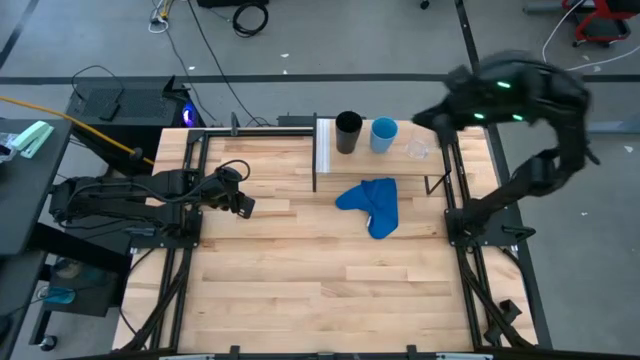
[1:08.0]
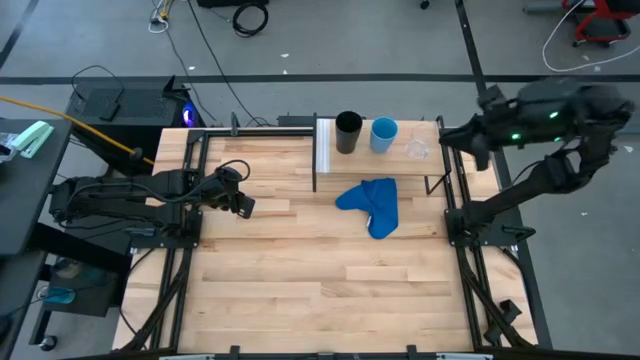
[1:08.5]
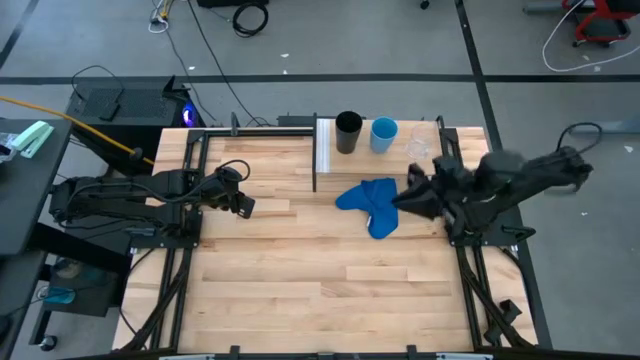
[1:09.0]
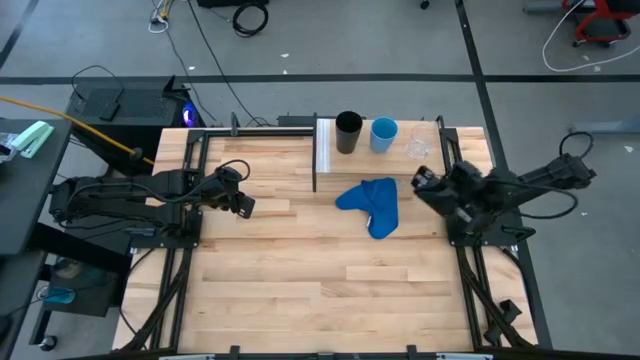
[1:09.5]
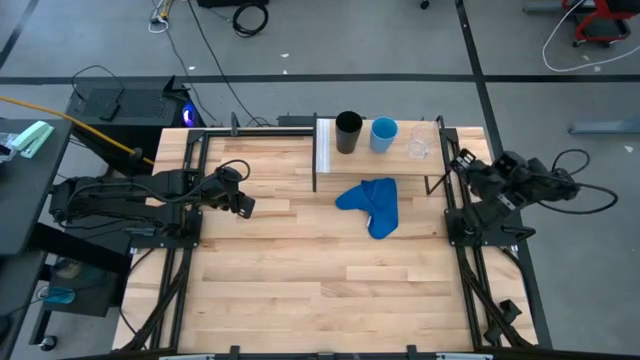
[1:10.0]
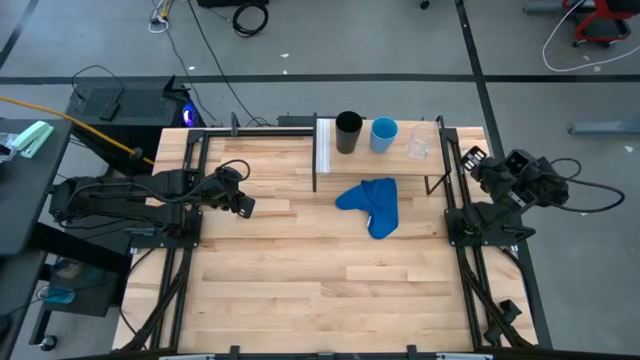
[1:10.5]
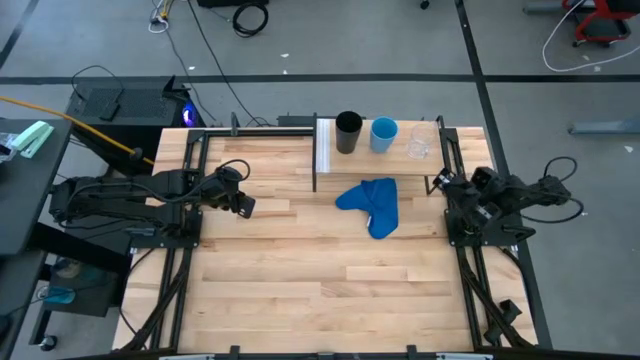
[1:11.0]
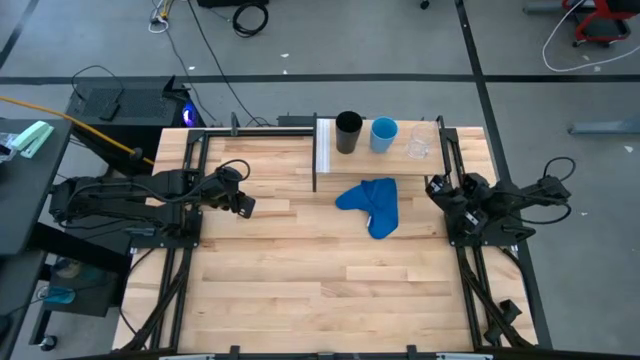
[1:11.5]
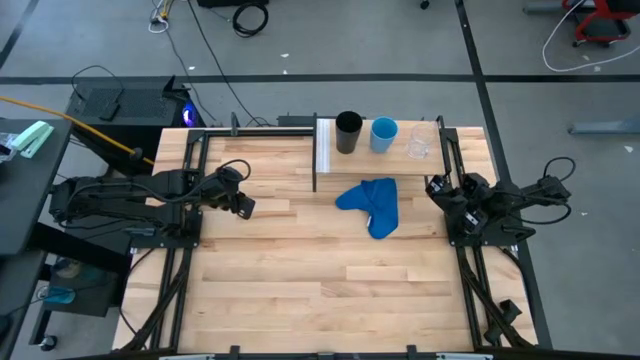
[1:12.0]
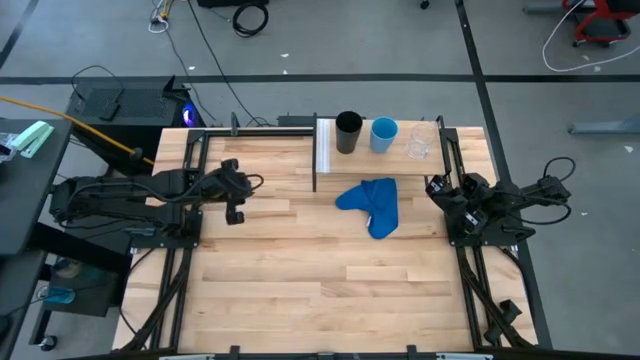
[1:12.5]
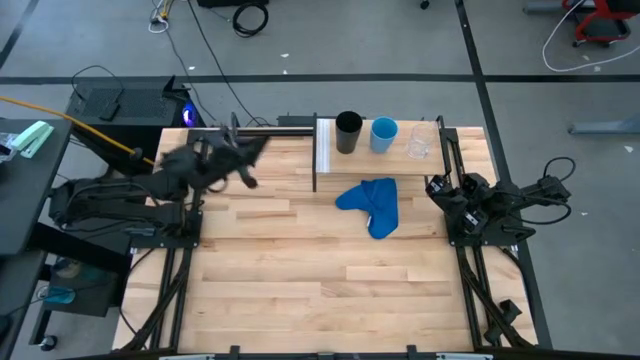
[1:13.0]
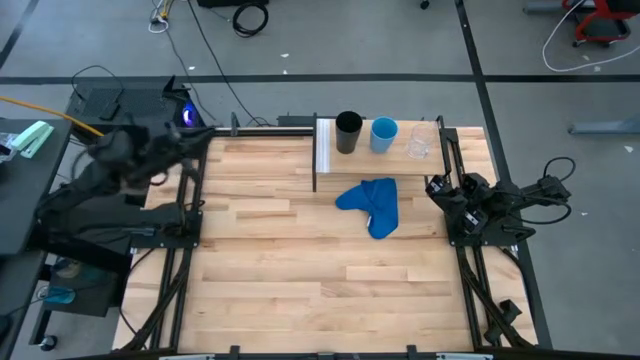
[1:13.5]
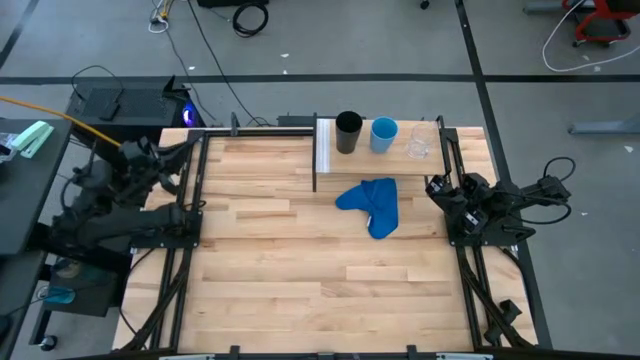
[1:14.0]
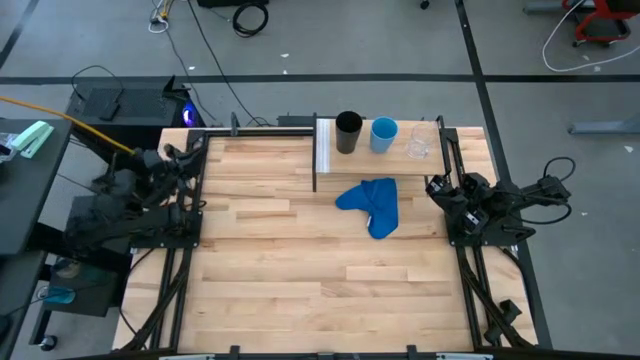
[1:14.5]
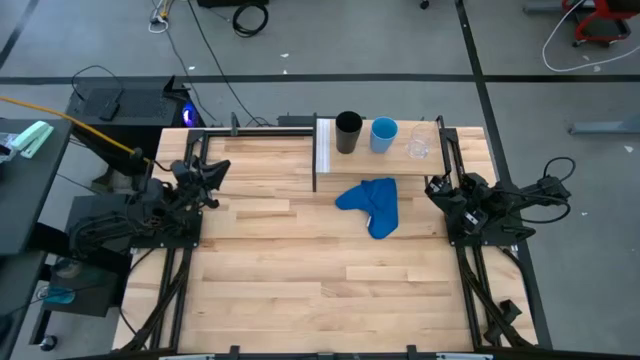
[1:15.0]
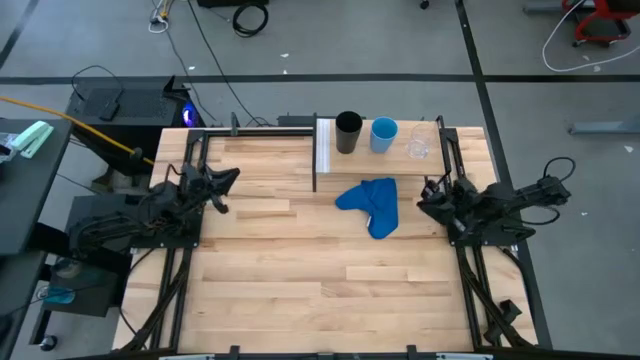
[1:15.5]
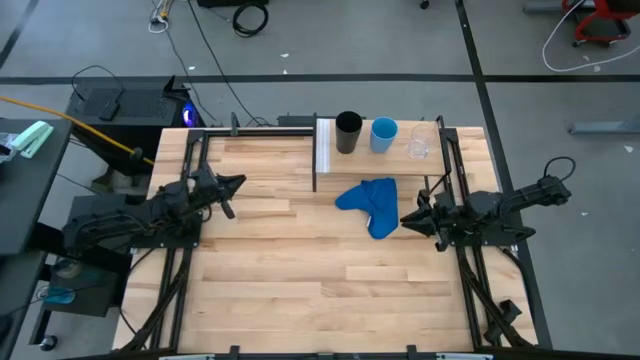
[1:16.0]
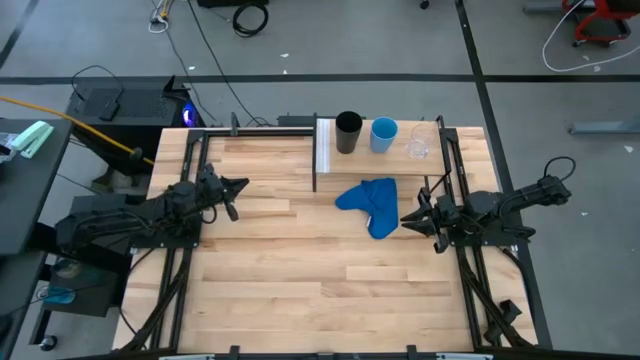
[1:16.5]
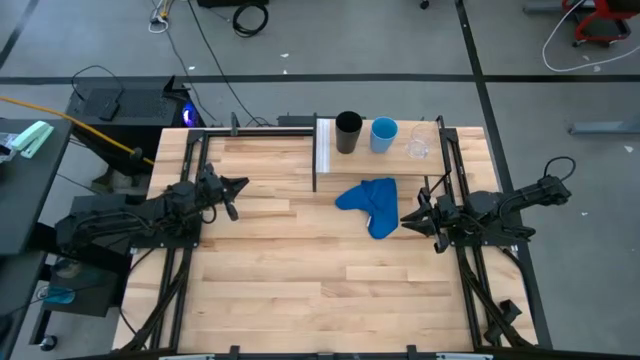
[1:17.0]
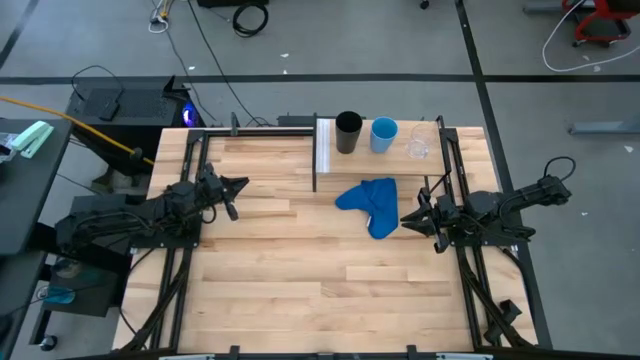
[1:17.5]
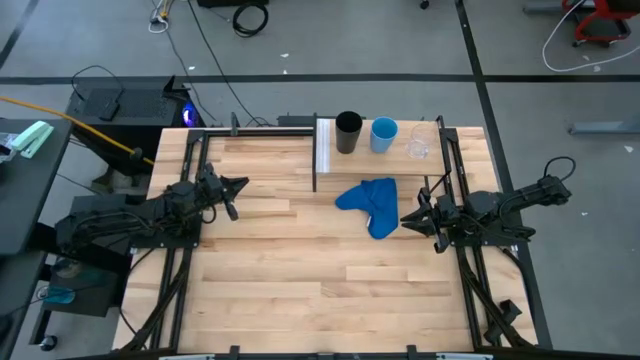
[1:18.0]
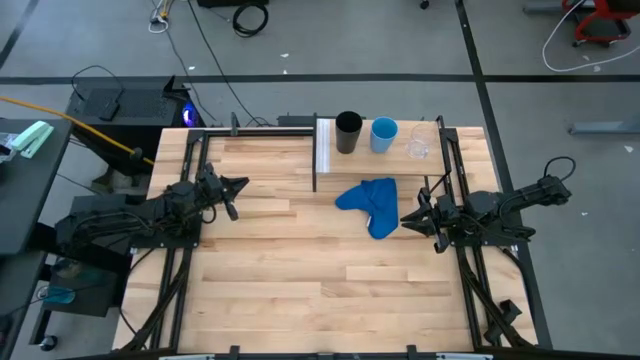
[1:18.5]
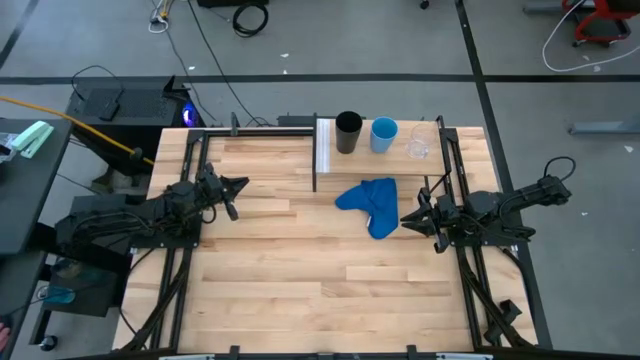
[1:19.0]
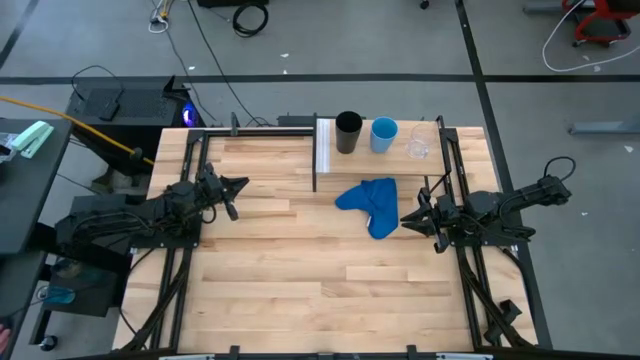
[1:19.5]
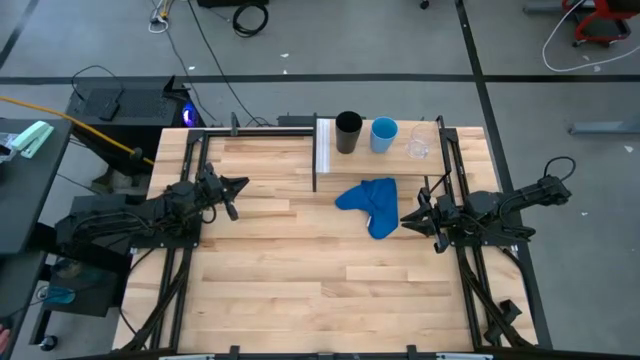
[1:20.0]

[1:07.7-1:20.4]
Task: Stack small to large cups/mugs on shelf
Return to Home Position

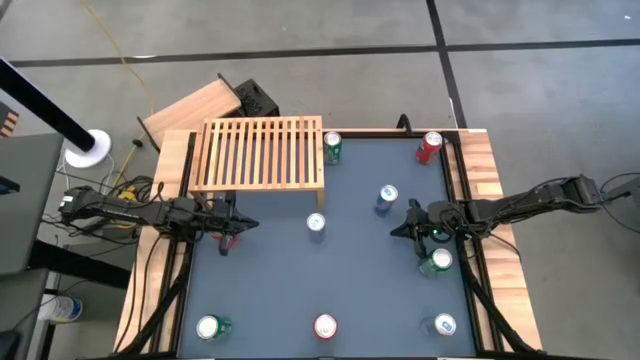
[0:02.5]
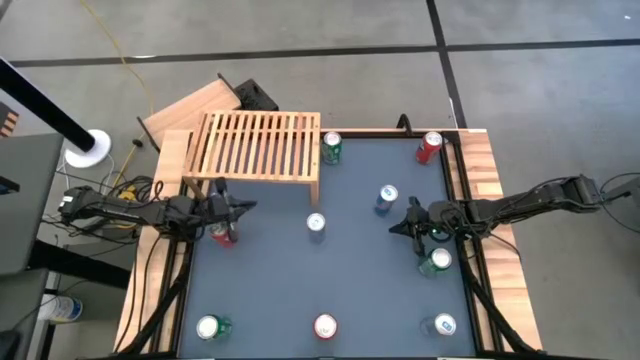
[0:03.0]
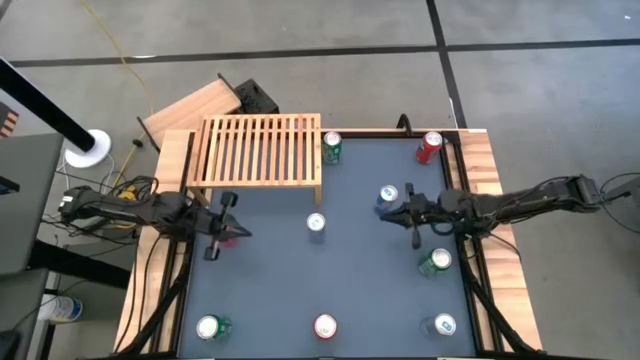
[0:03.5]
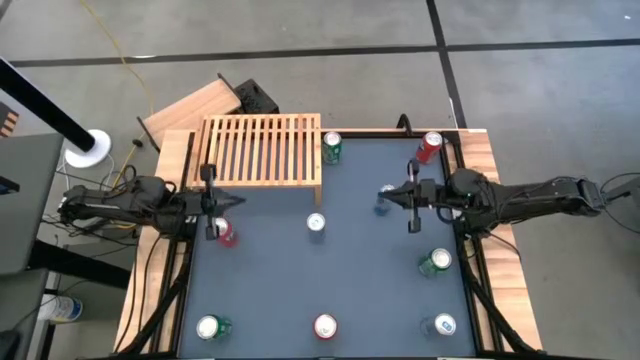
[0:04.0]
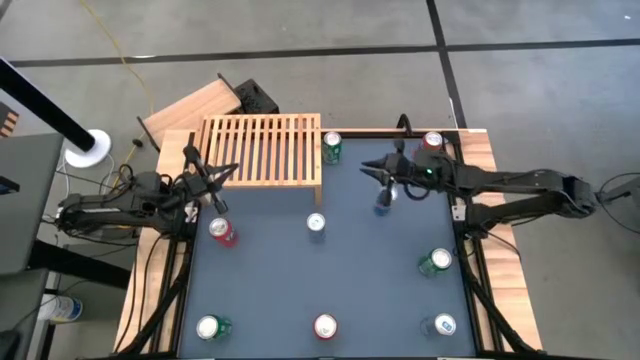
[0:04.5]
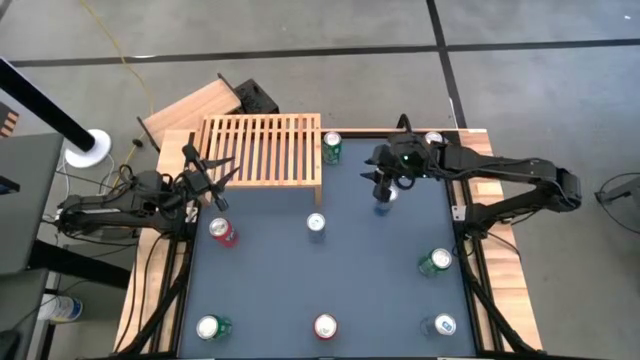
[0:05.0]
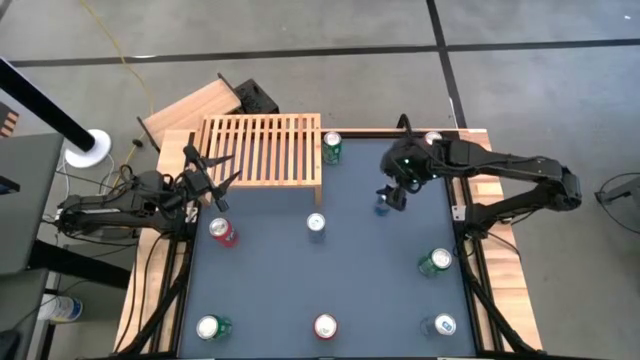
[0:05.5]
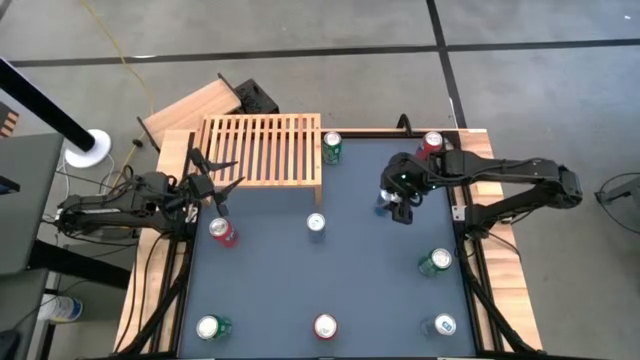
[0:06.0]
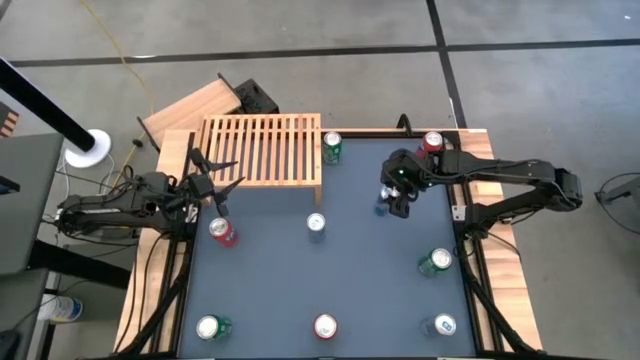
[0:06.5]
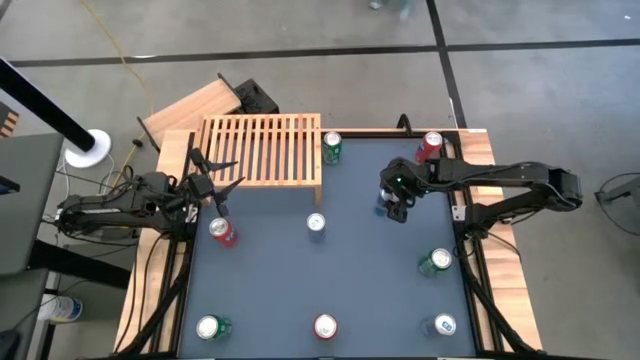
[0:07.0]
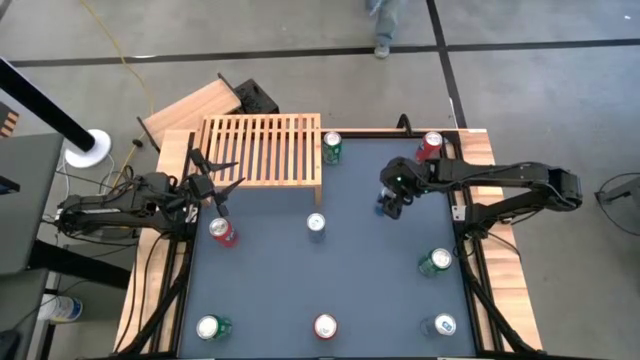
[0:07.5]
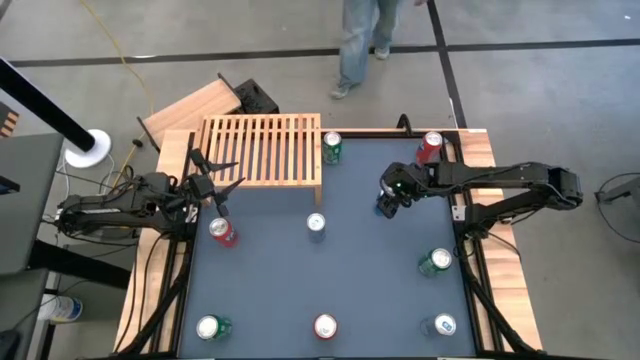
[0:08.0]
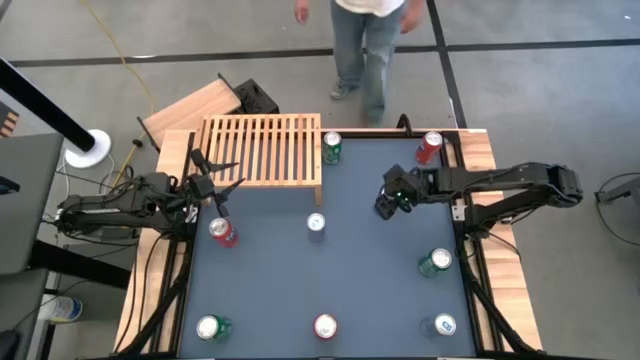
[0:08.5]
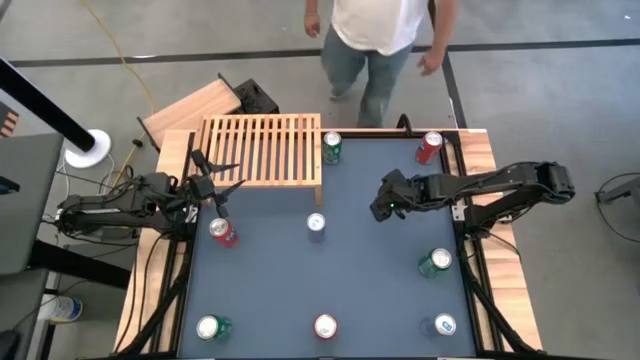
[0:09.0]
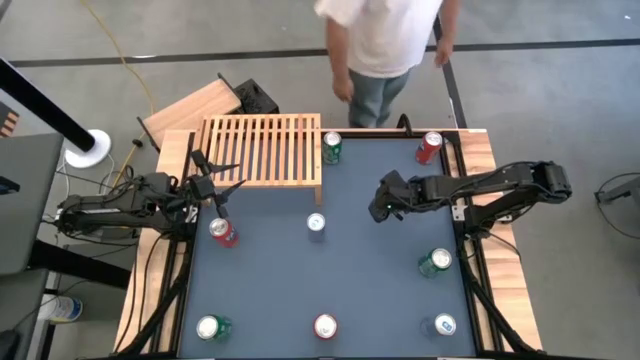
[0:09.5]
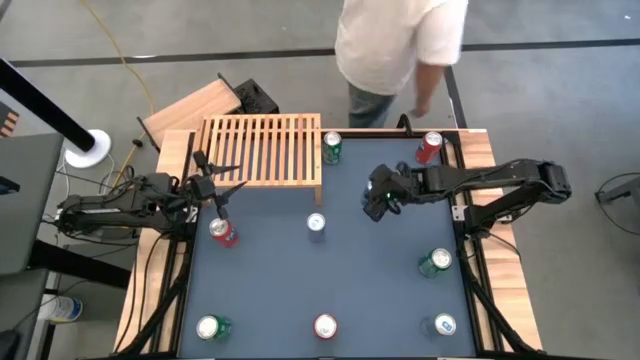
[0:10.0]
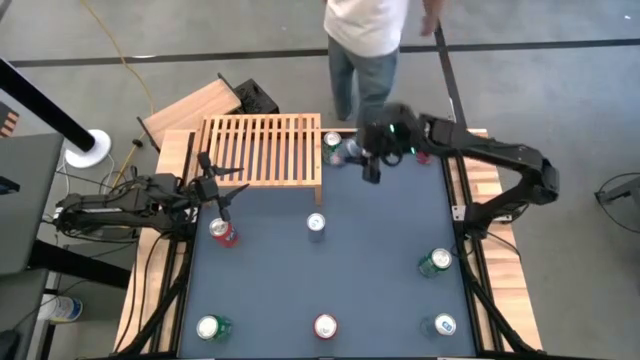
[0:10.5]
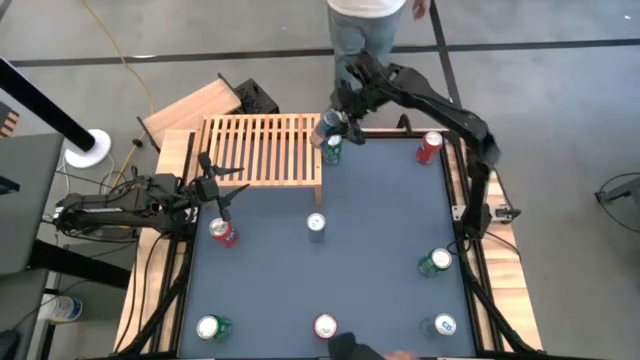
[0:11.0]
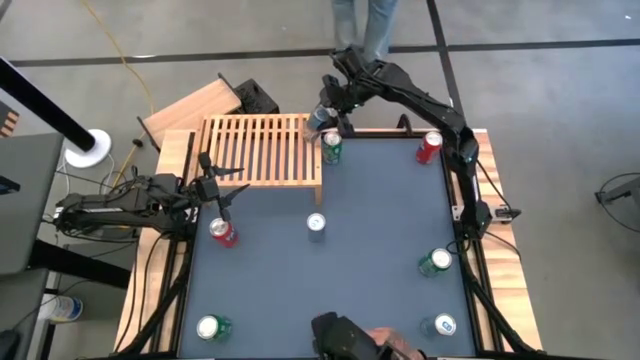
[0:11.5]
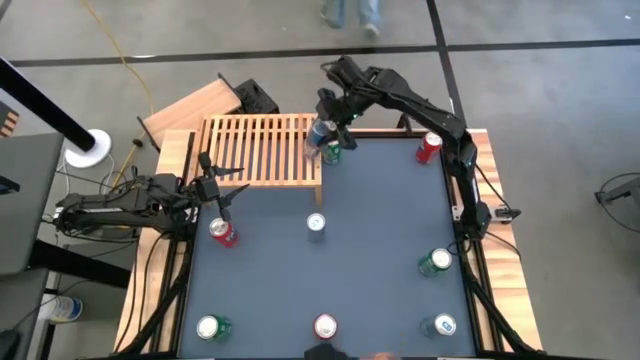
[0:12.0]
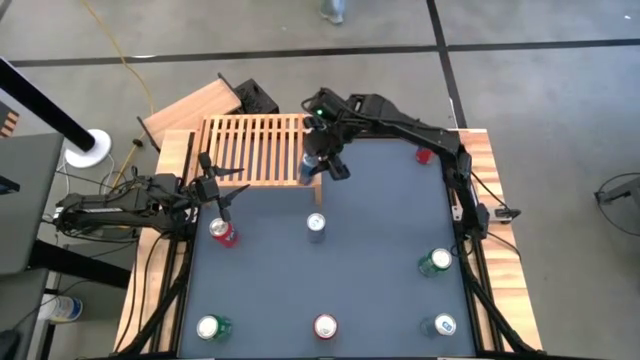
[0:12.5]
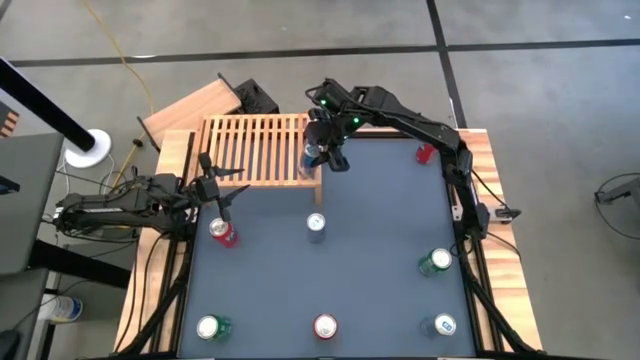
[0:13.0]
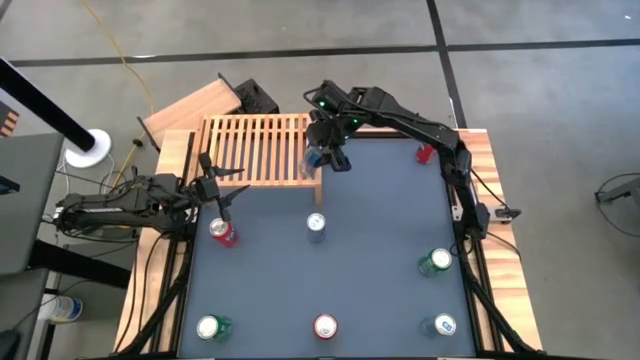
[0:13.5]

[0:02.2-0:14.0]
Task: Place canned beverage on shelf
Put the top blue soda can on the shelf
